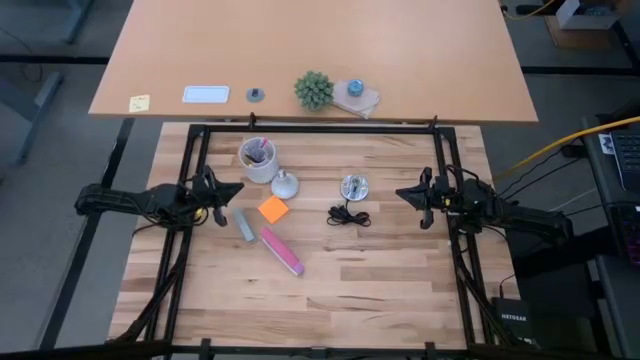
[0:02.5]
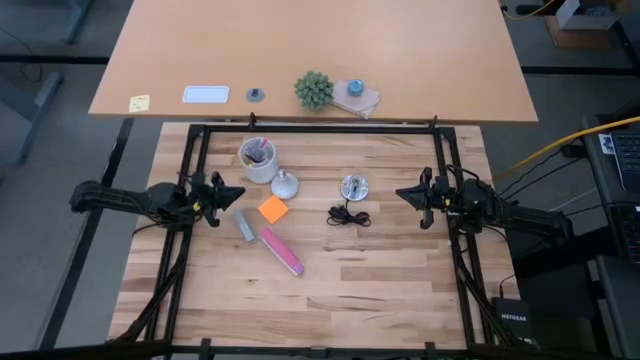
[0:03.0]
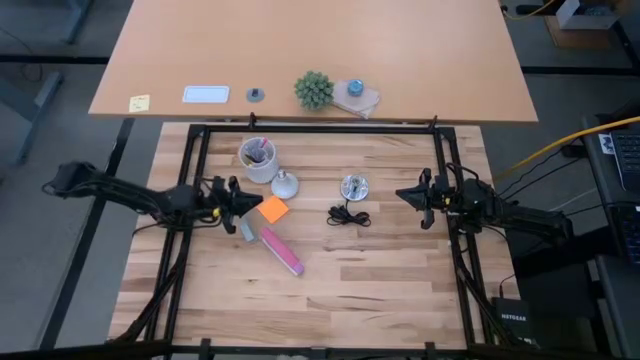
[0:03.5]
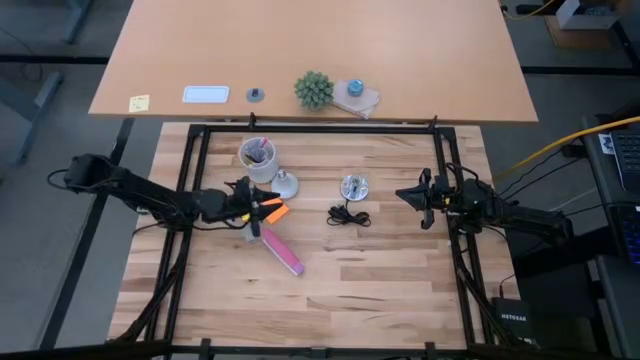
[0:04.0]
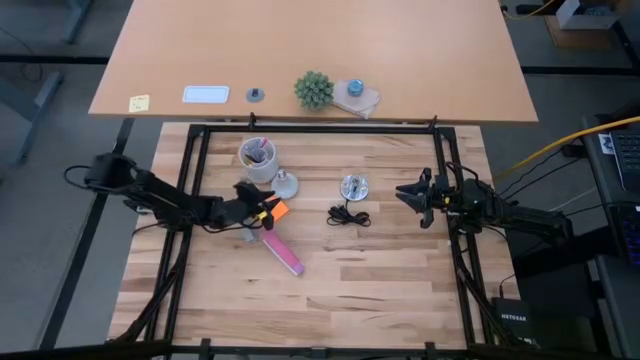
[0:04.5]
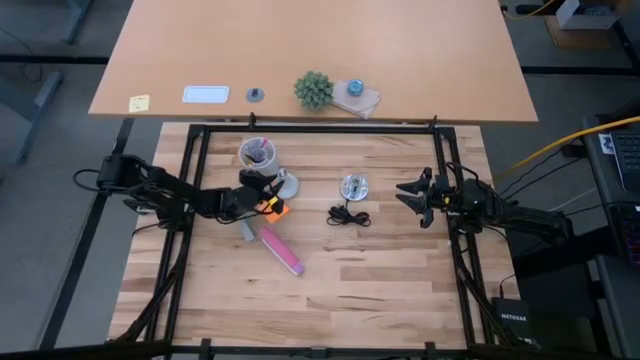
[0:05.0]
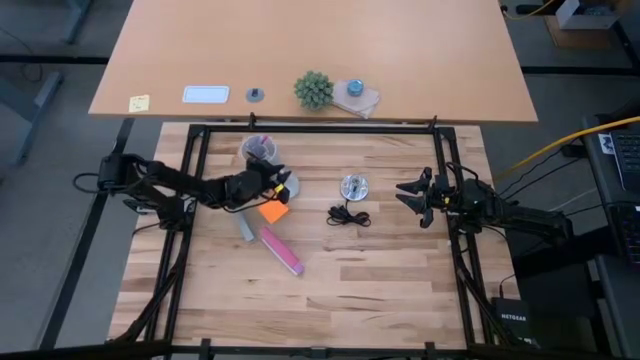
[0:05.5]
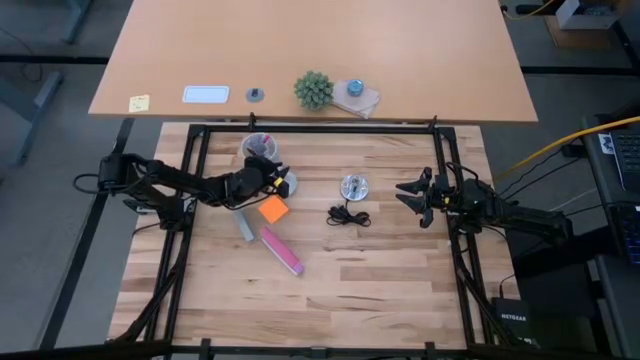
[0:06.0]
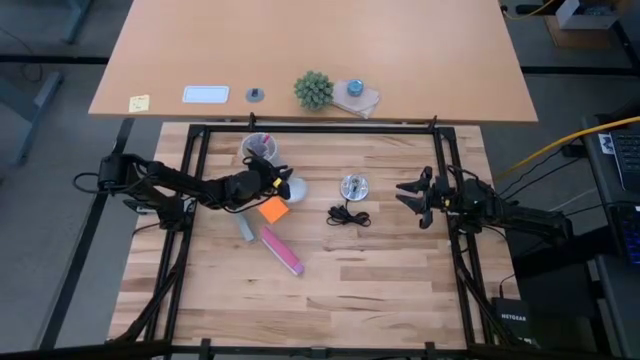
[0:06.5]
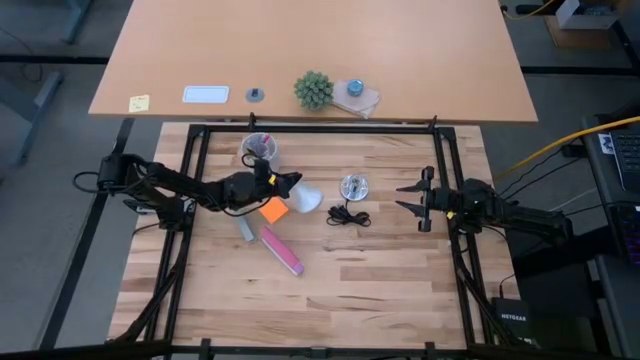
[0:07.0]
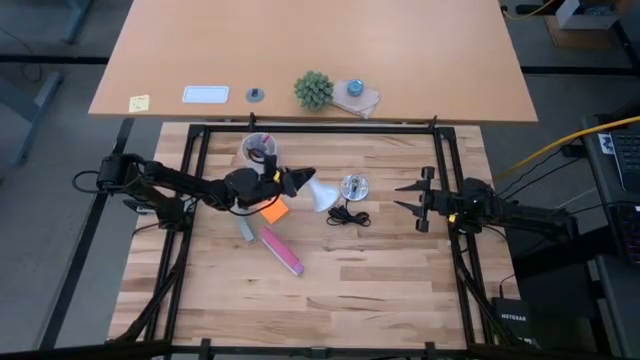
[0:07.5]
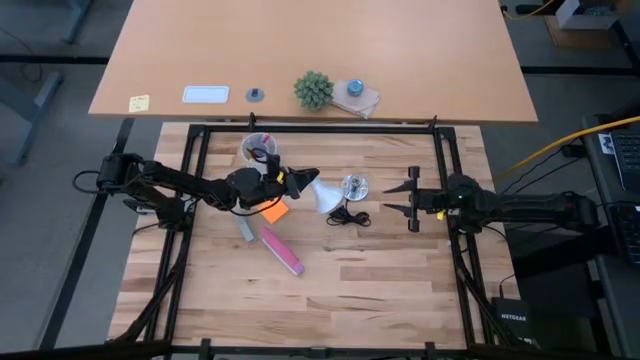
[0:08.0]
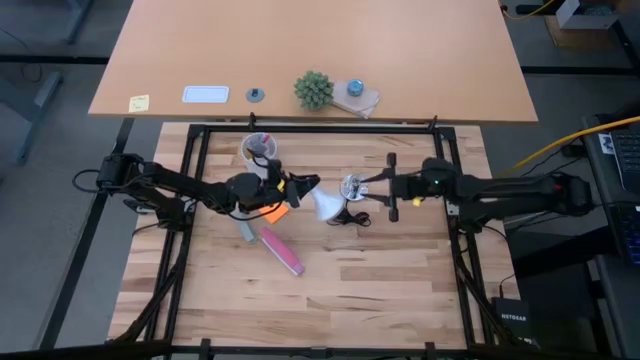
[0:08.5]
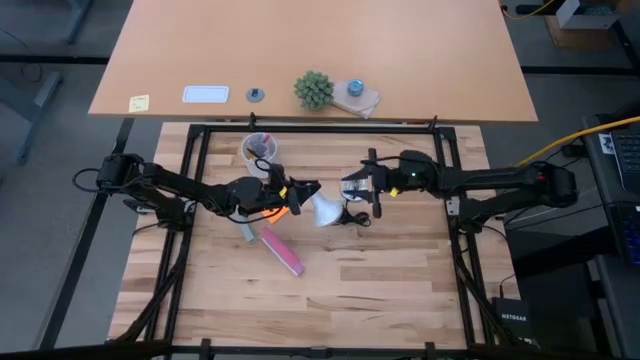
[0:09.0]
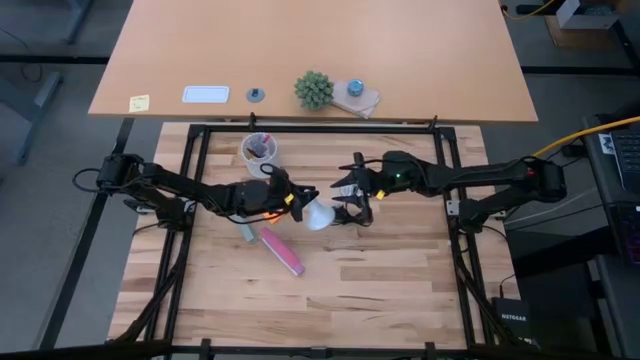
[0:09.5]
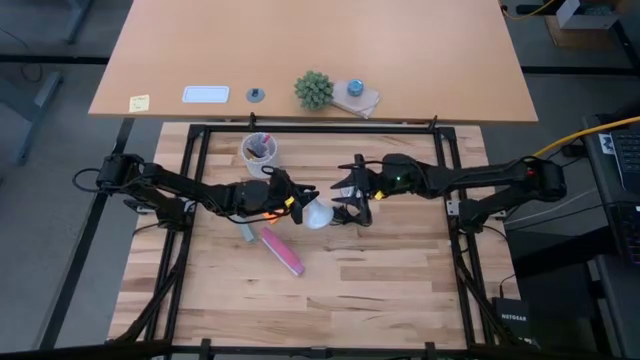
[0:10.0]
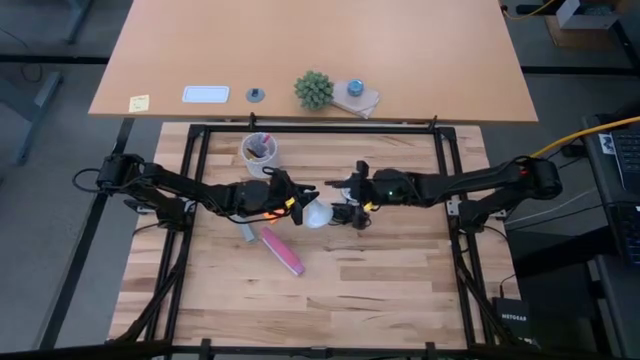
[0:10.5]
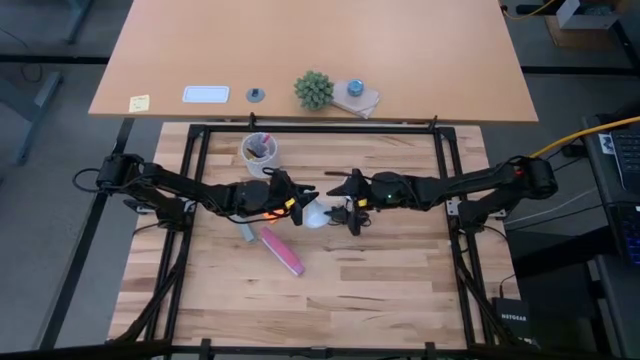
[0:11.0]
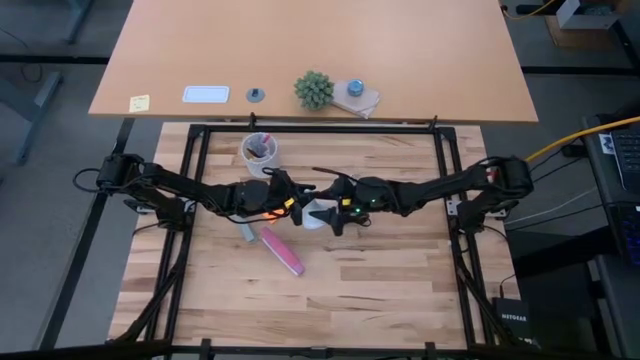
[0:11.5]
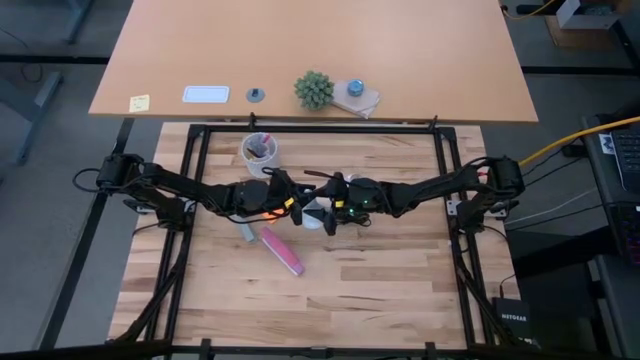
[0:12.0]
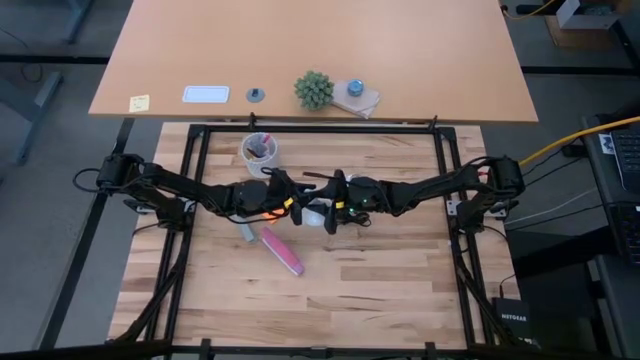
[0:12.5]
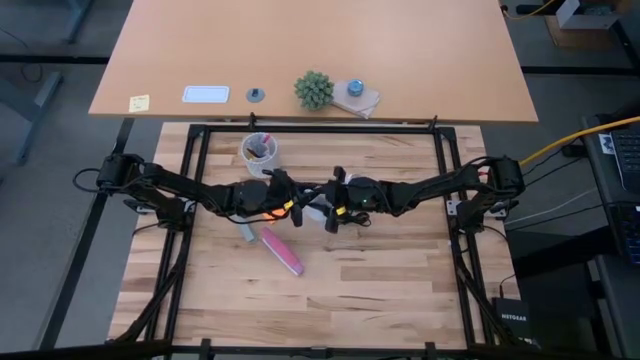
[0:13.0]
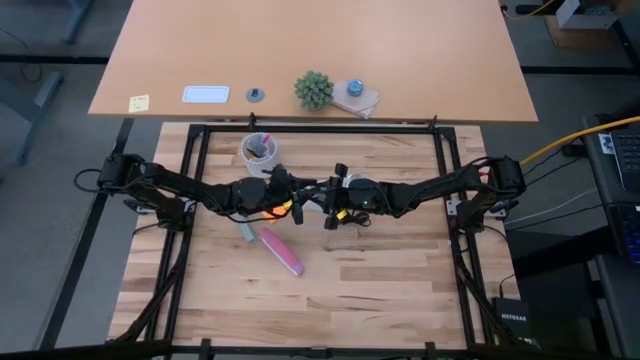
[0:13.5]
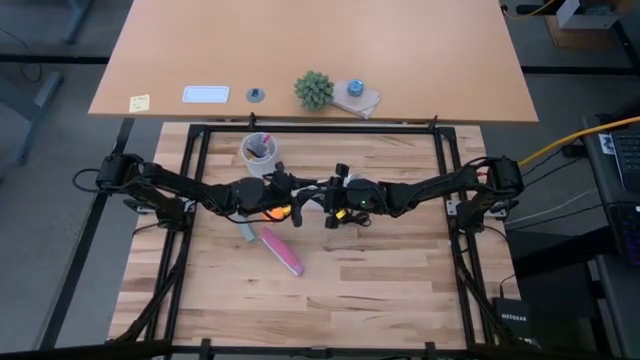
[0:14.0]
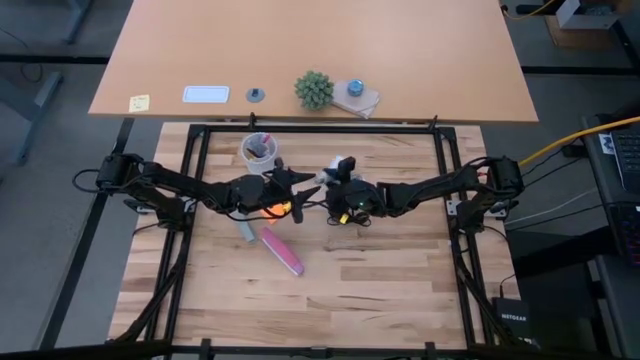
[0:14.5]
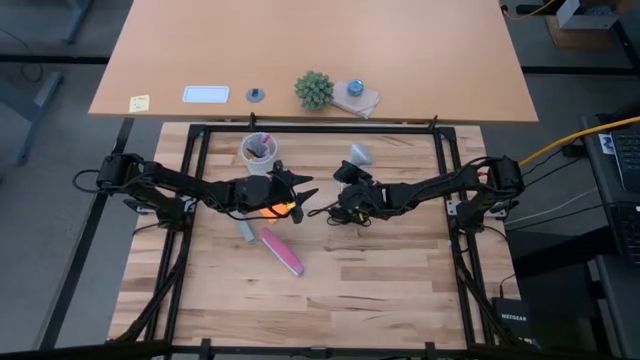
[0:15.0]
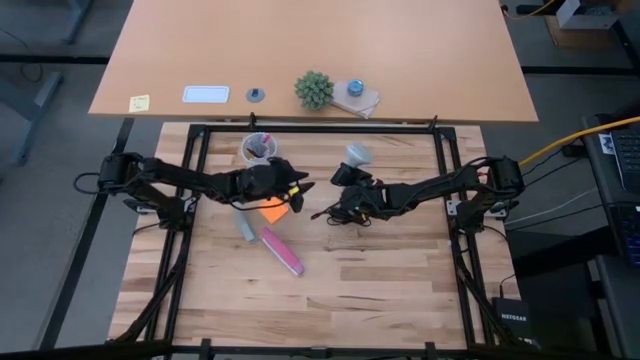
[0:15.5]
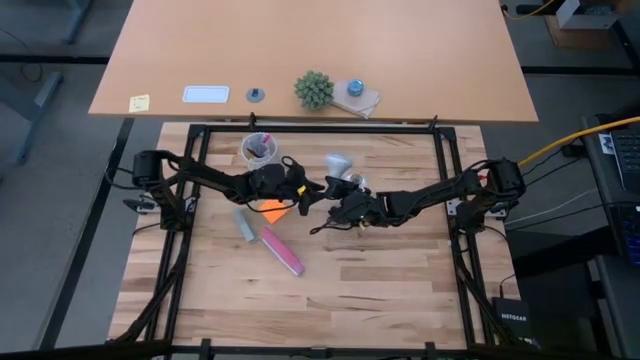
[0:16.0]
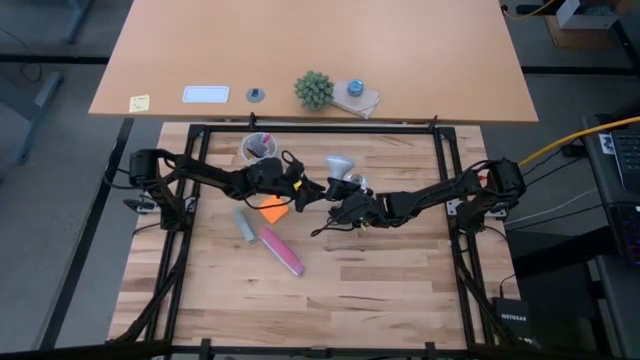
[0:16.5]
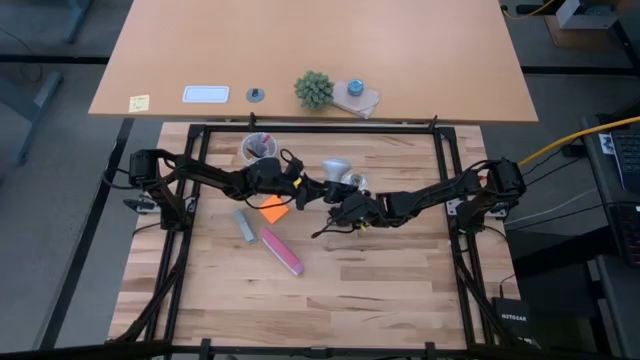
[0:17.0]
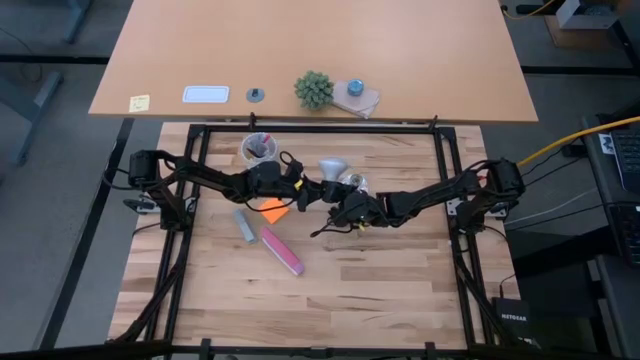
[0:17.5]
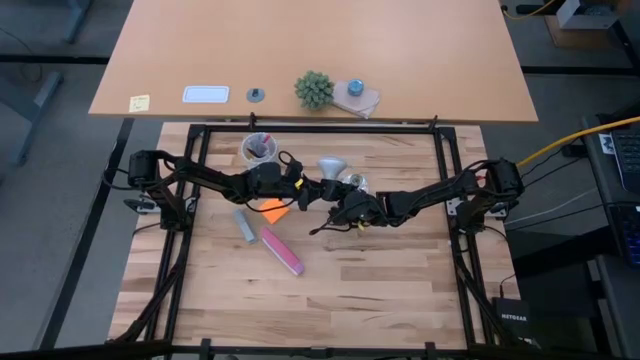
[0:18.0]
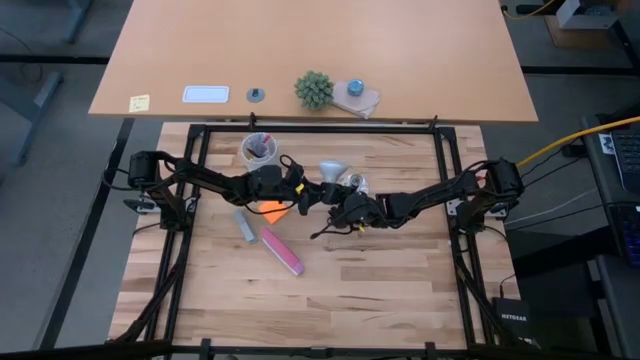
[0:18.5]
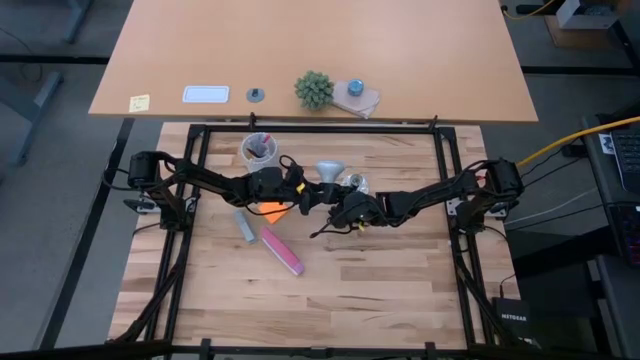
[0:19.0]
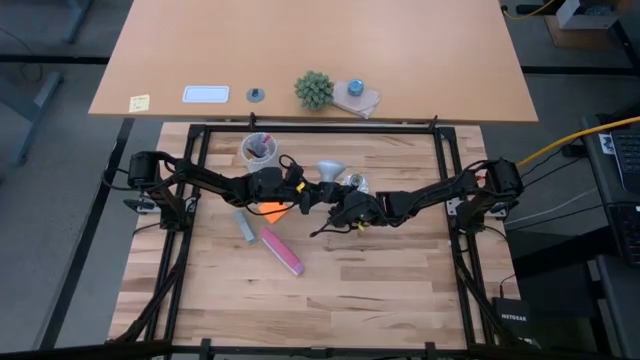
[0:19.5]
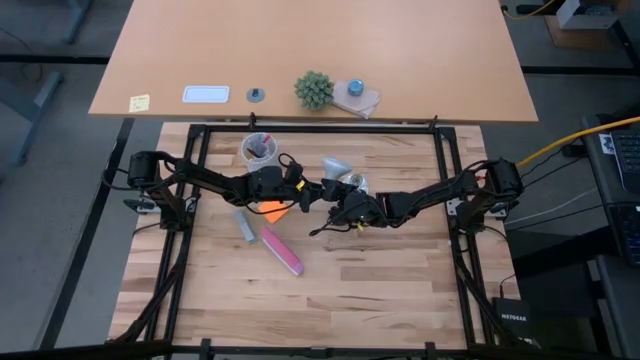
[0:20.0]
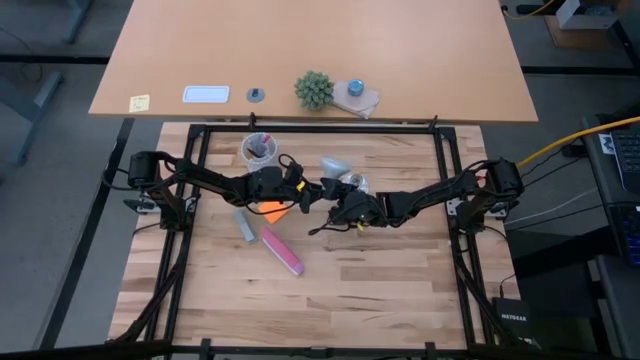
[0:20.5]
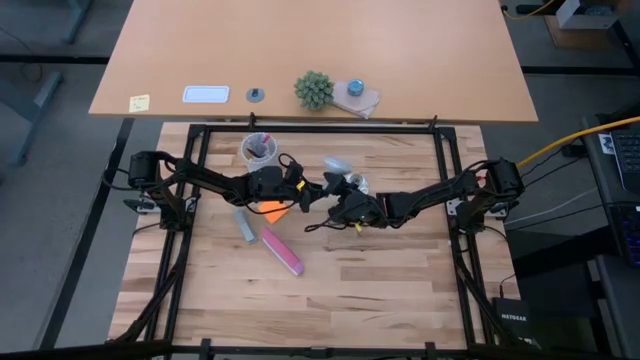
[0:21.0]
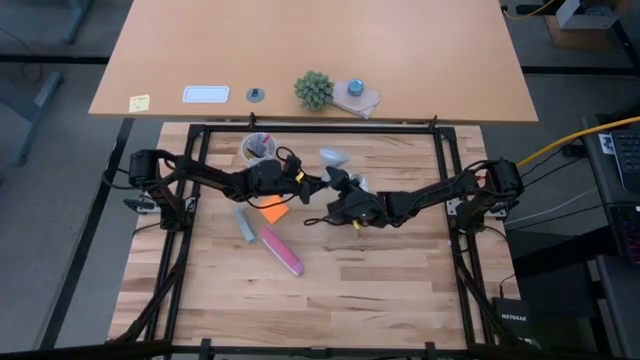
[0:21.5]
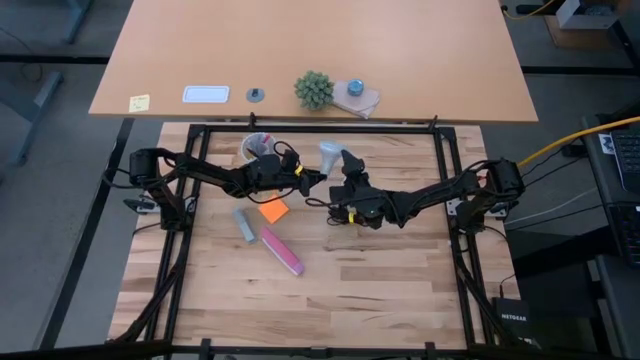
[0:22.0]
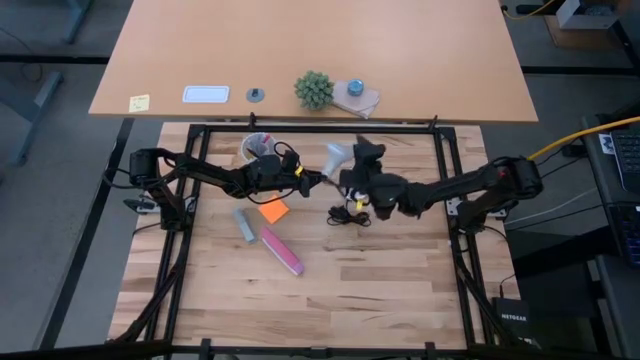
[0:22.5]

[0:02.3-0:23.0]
Task: Screw lightbulb
Insert the lightbulb into the lamp
